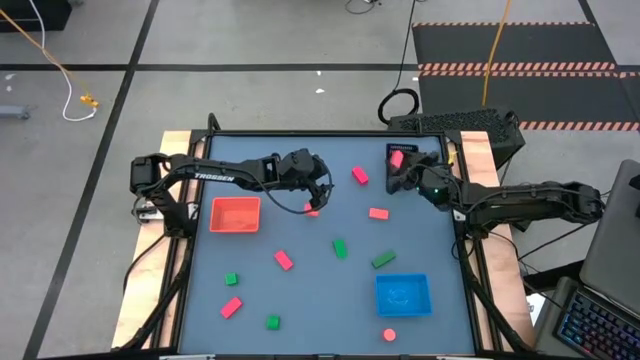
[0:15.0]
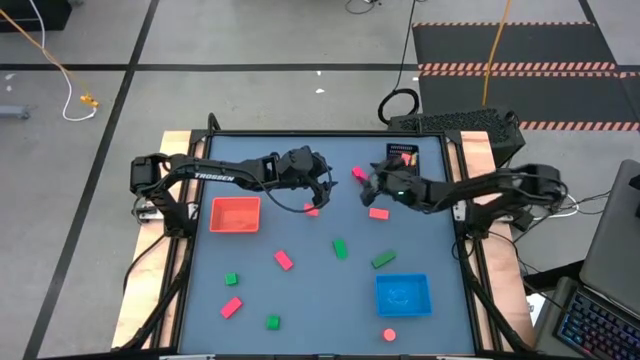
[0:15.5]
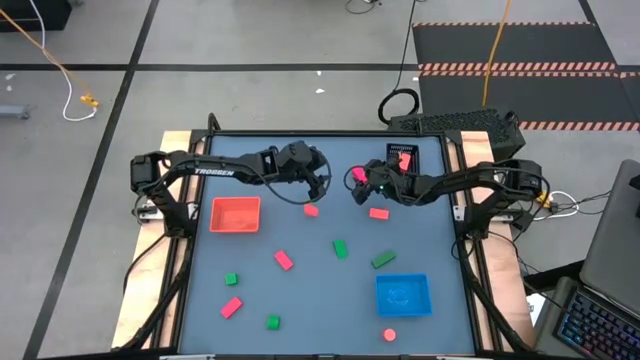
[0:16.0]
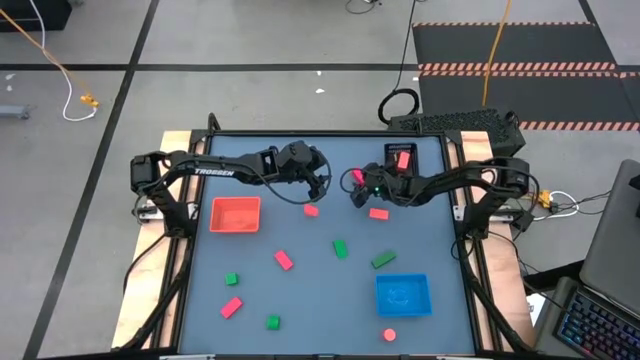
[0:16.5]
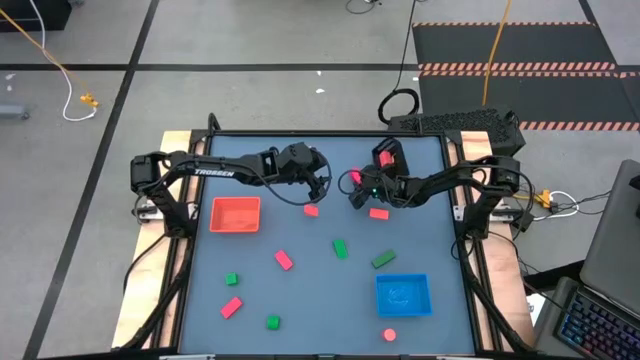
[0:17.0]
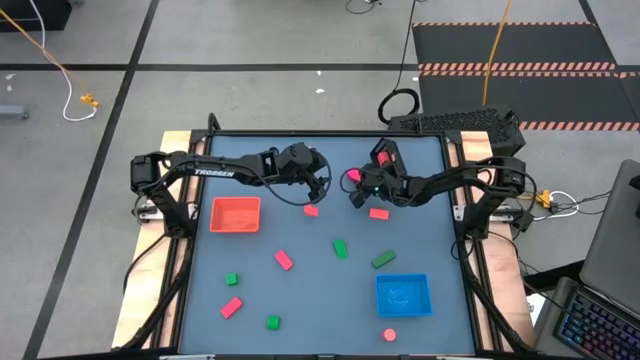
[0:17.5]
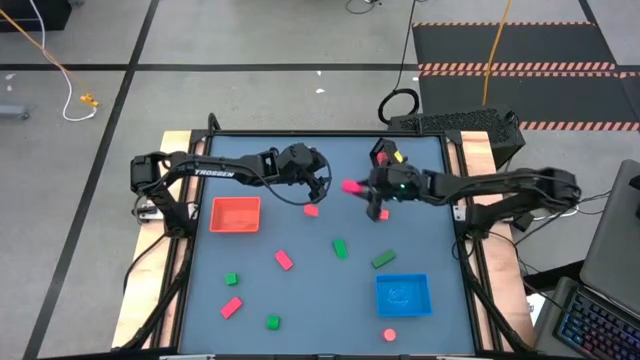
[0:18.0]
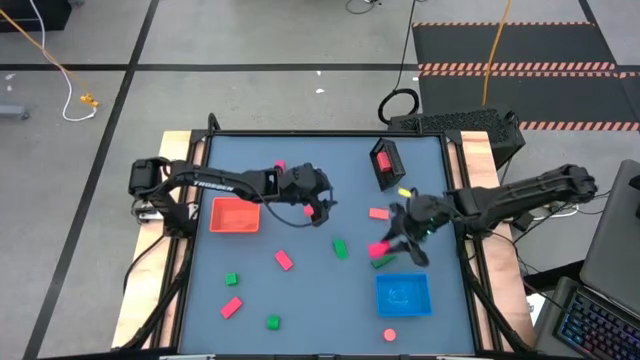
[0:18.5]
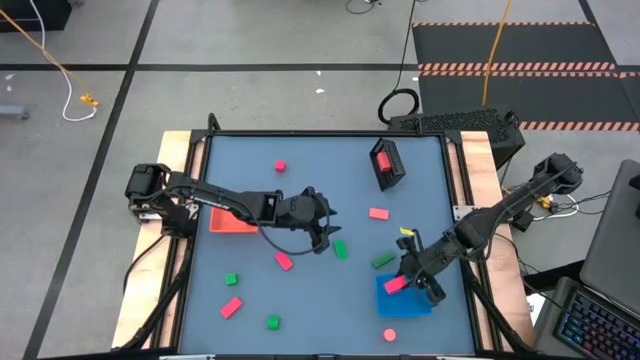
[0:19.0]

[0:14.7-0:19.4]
Task: Sort & place blocks by color
Put the red block into the blue bin

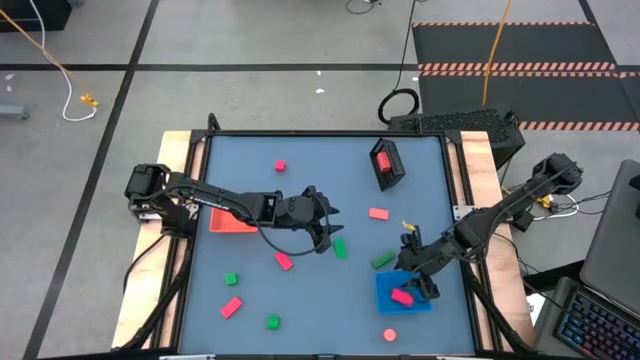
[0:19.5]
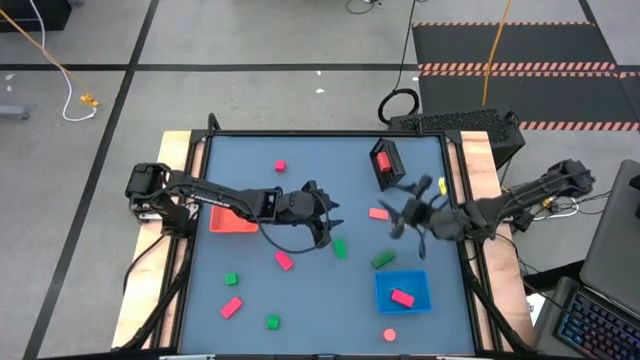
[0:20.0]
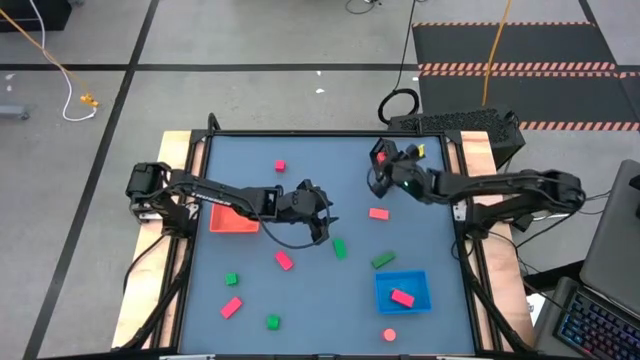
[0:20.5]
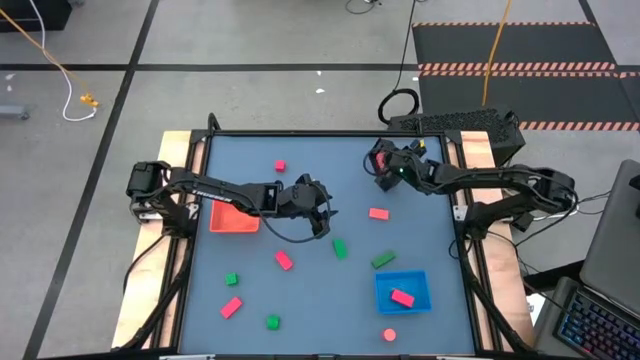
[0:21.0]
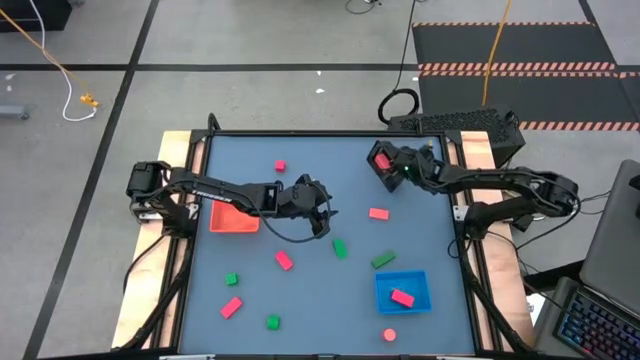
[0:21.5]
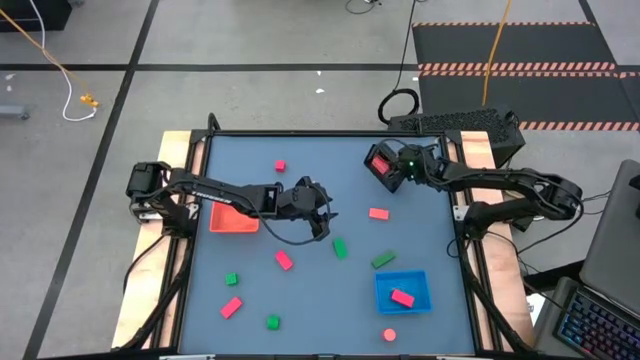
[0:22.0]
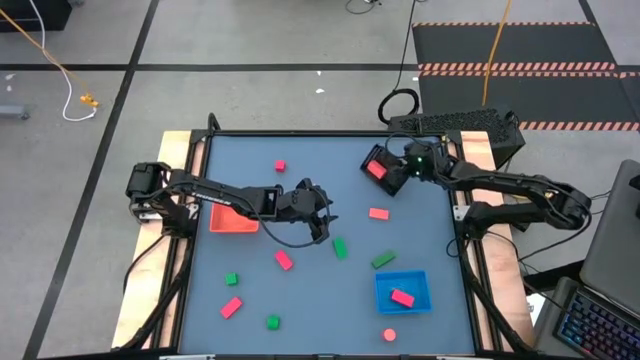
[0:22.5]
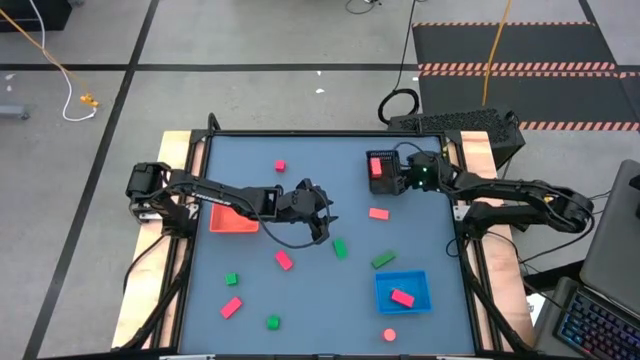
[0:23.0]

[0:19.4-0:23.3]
Adjust the black bin

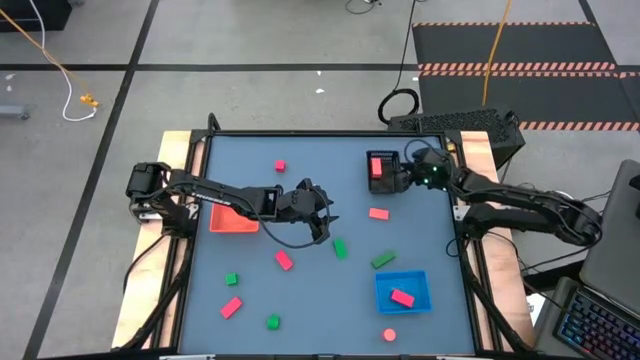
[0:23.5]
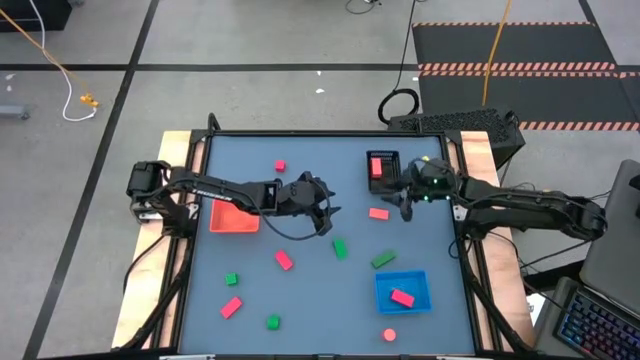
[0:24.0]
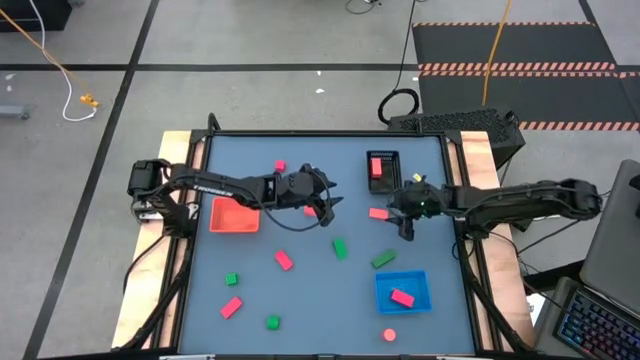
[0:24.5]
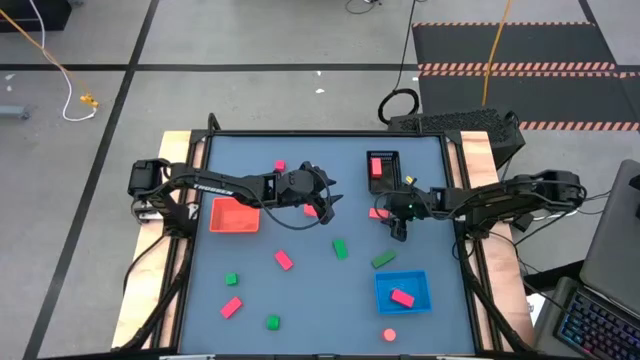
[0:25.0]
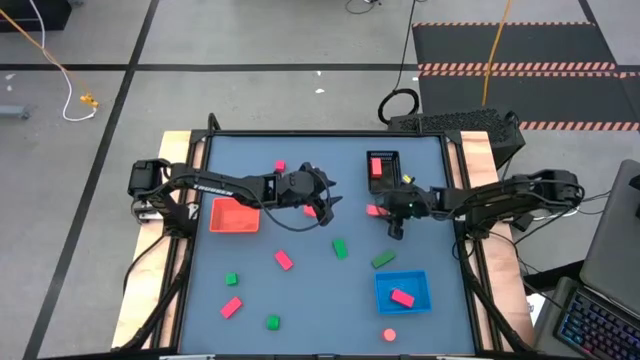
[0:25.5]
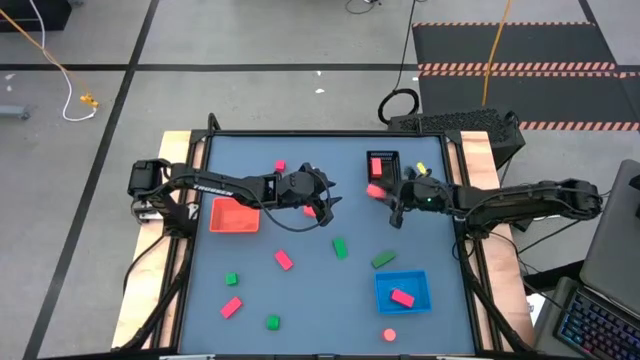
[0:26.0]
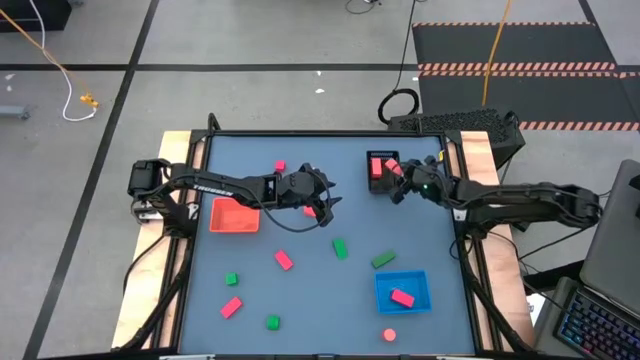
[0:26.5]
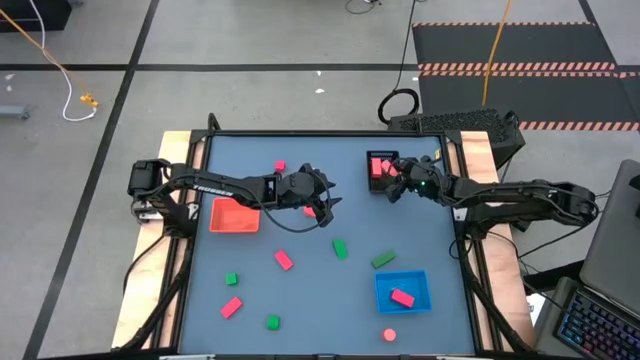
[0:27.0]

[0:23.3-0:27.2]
Put the orange block into the black bin

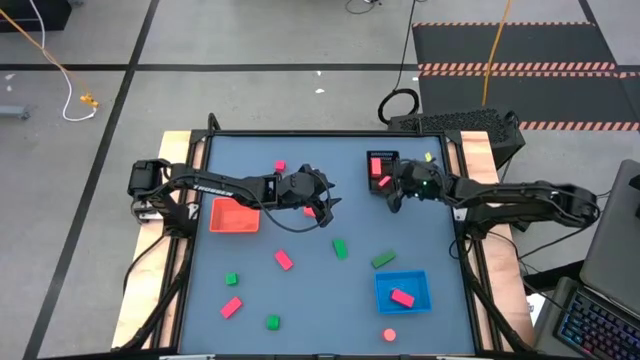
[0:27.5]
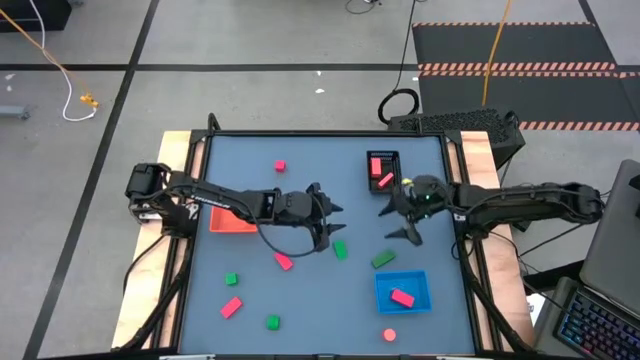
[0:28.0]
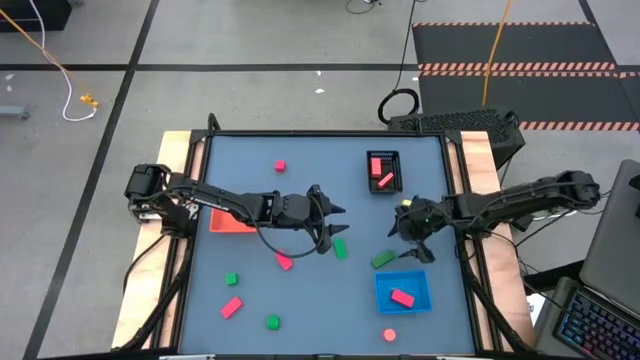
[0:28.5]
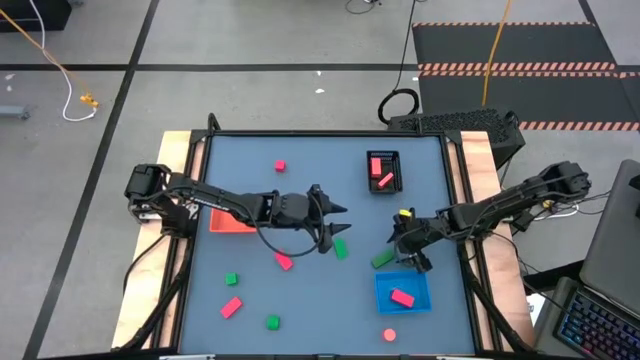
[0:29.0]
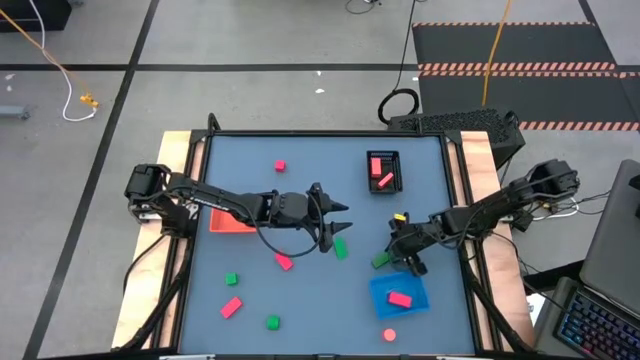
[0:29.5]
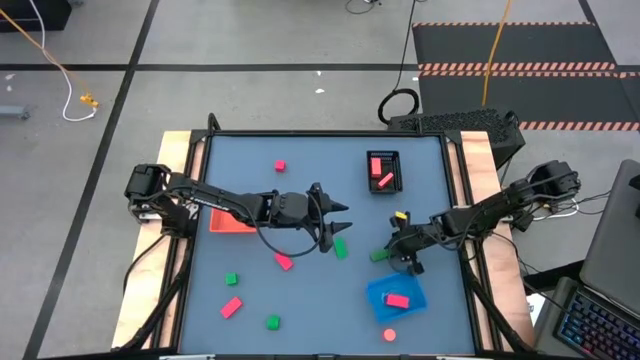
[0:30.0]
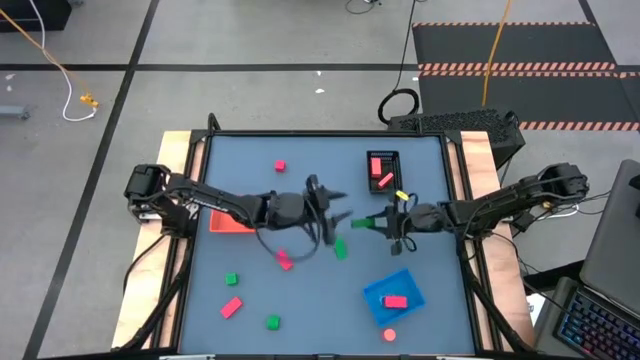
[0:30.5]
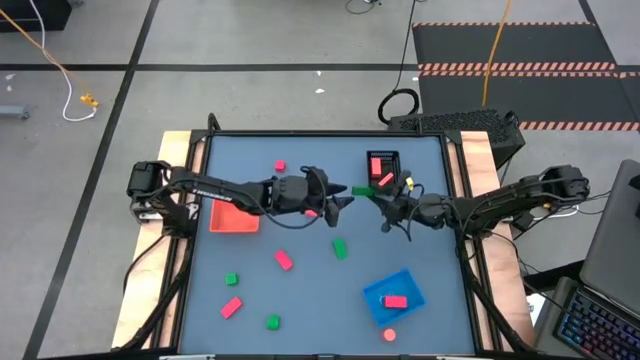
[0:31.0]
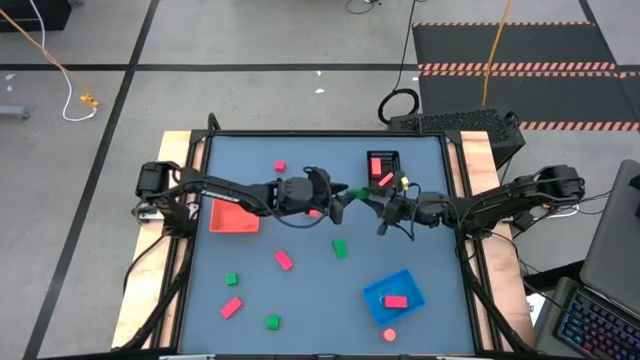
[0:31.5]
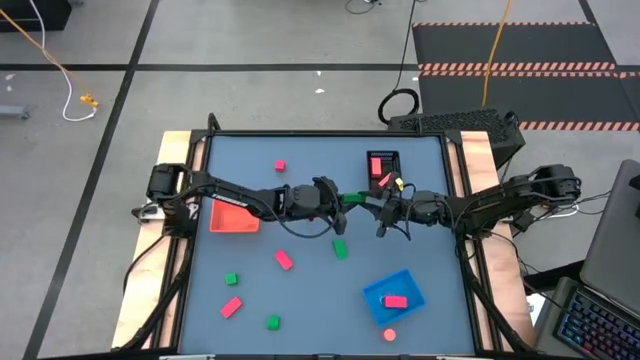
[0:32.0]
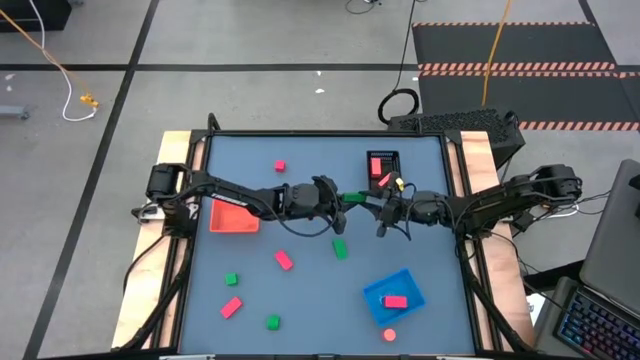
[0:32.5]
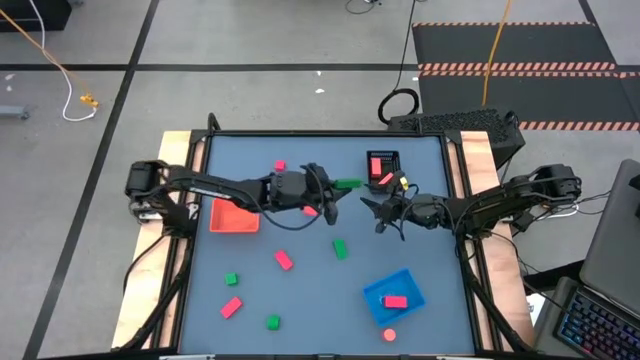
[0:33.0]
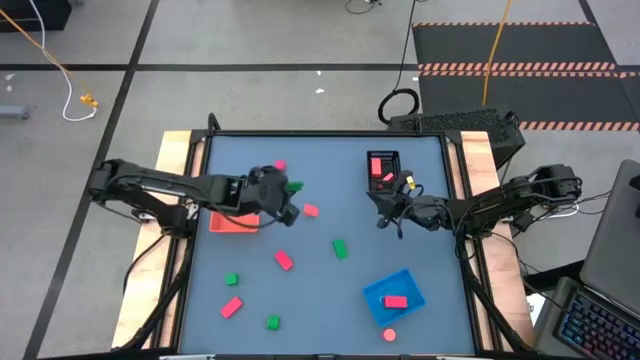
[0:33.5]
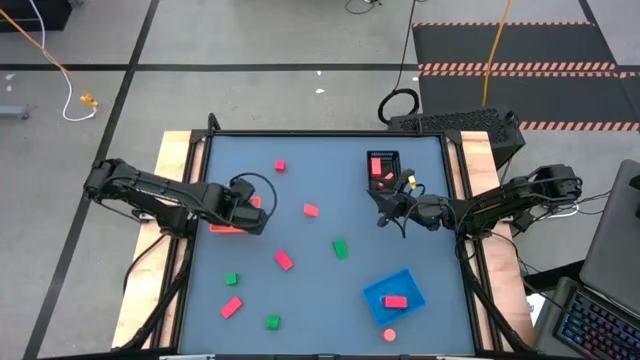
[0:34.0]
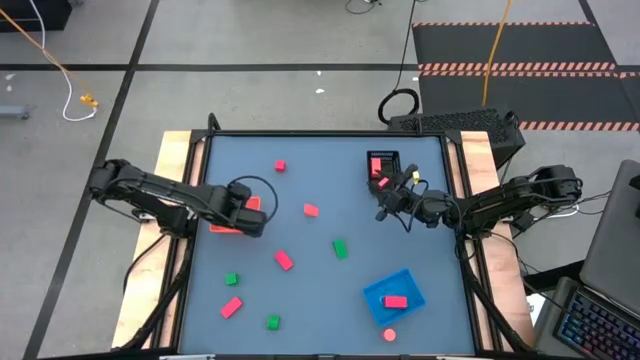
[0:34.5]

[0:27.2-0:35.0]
Put the green block into the orange bin

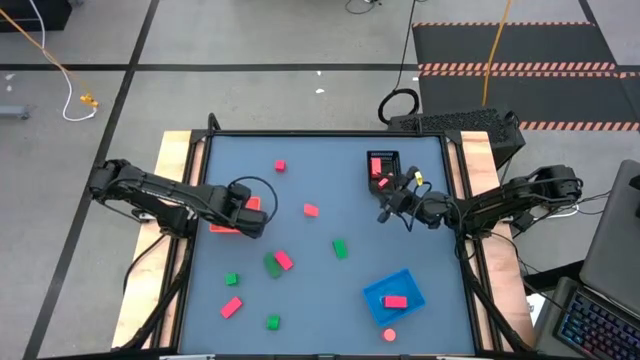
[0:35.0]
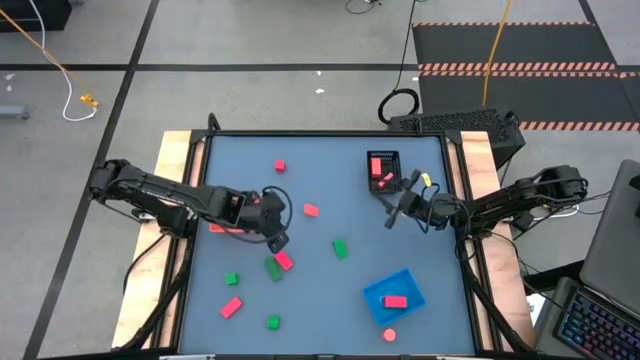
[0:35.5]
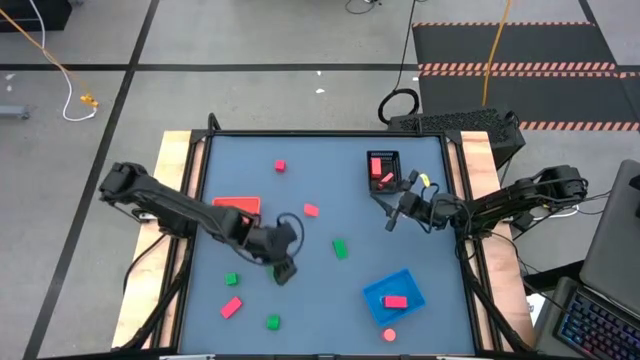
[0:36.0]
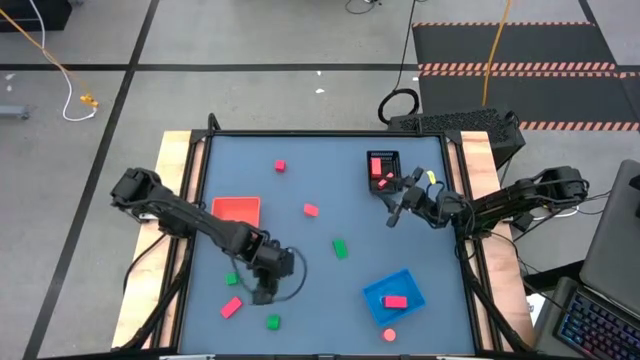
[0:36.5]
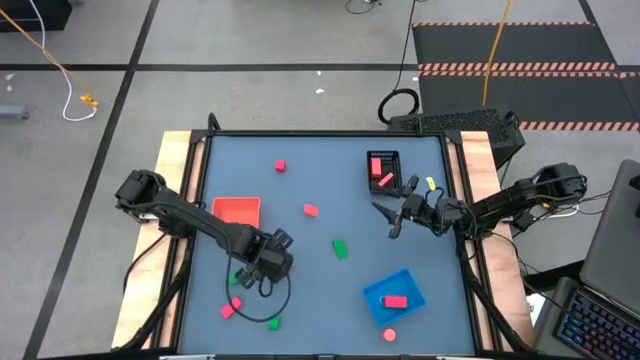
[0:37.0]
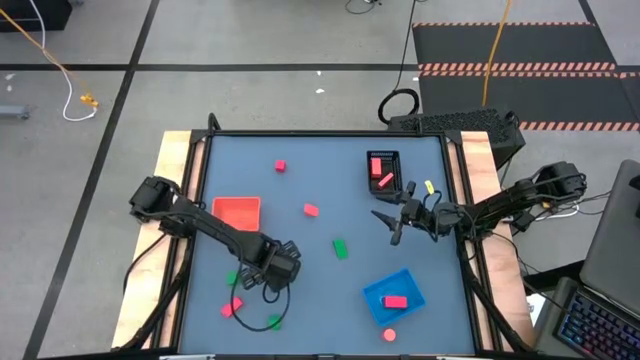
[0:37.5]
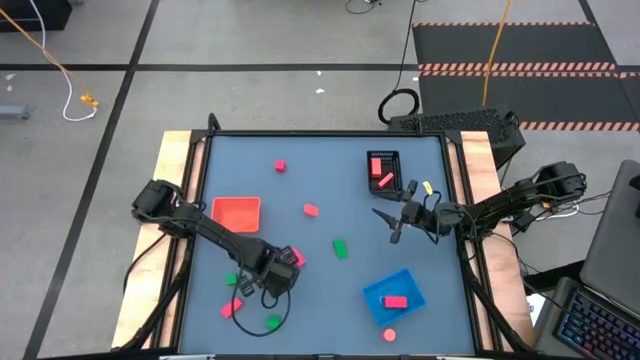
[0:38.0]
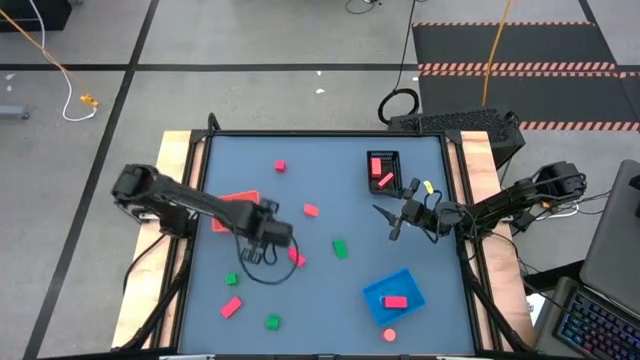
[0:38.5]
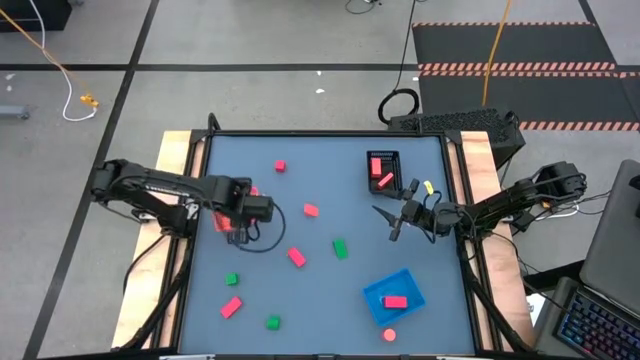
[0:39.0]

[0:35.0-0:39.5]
Put the green block into the orange bin
